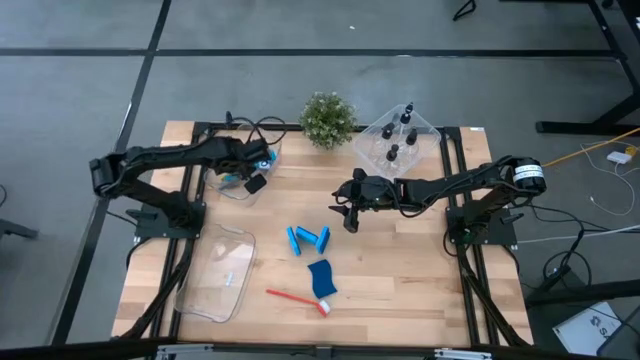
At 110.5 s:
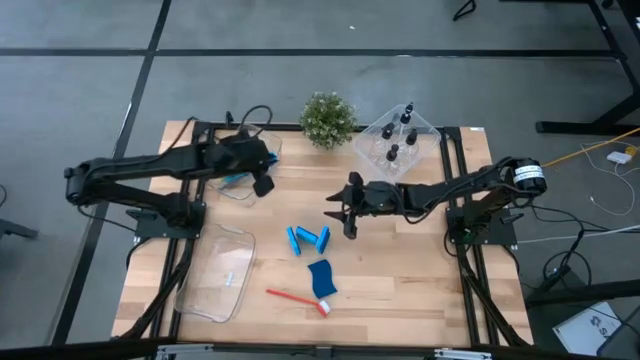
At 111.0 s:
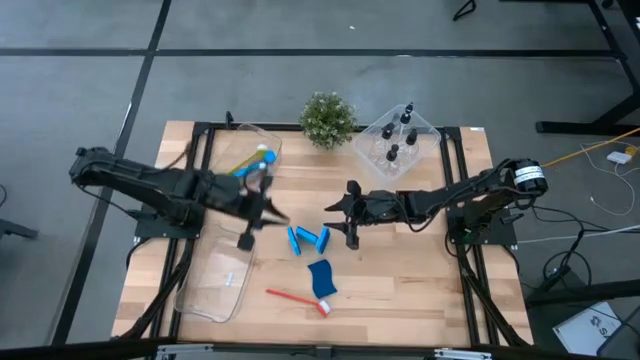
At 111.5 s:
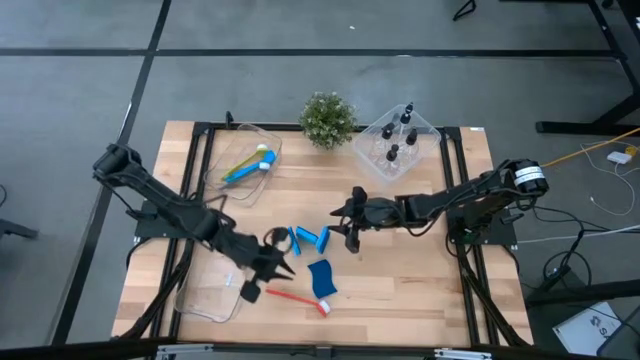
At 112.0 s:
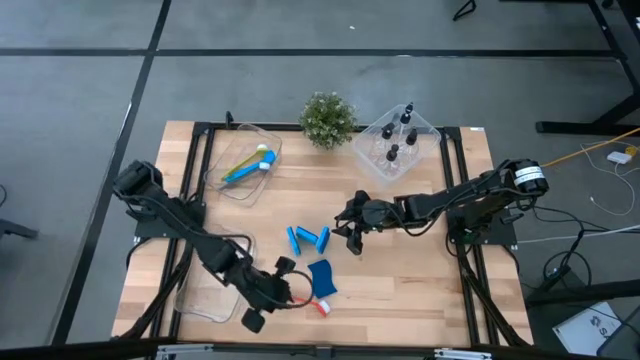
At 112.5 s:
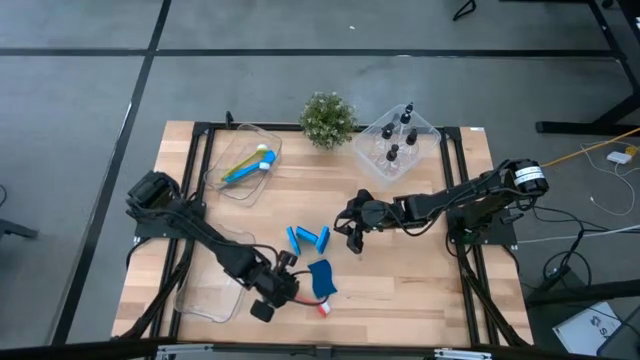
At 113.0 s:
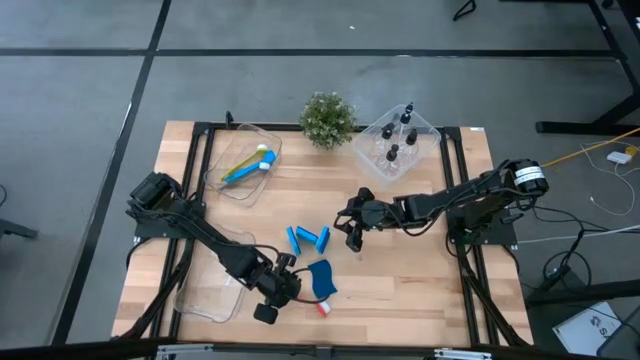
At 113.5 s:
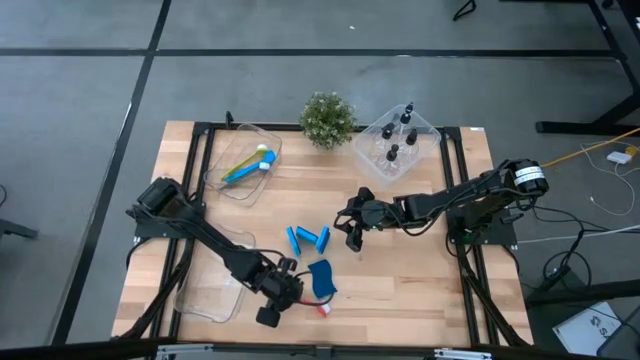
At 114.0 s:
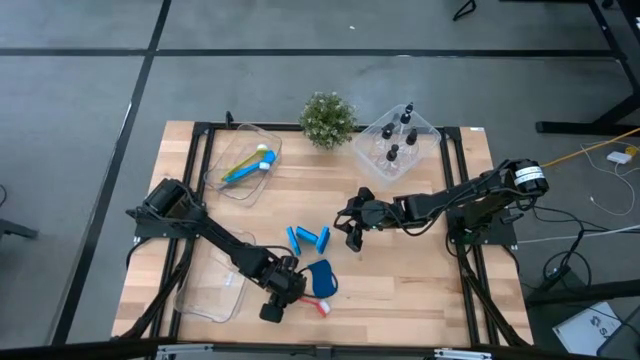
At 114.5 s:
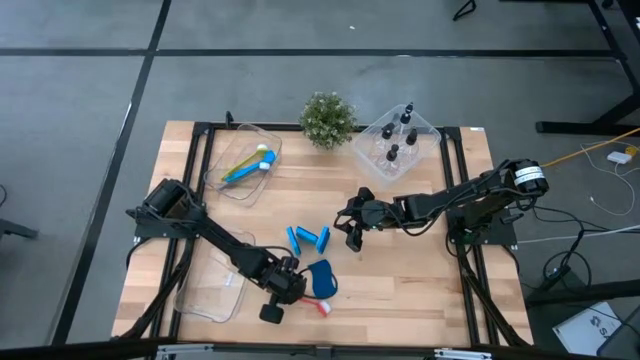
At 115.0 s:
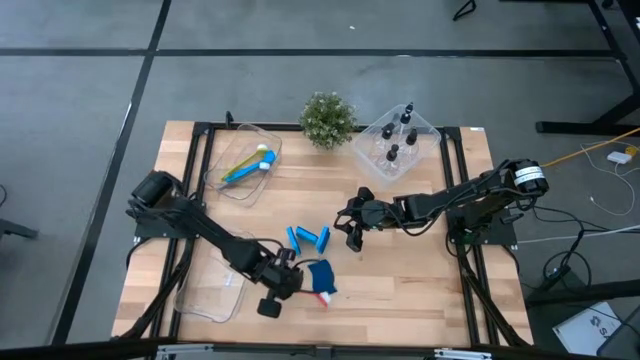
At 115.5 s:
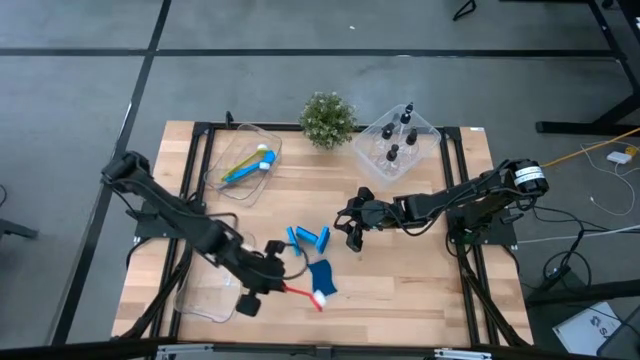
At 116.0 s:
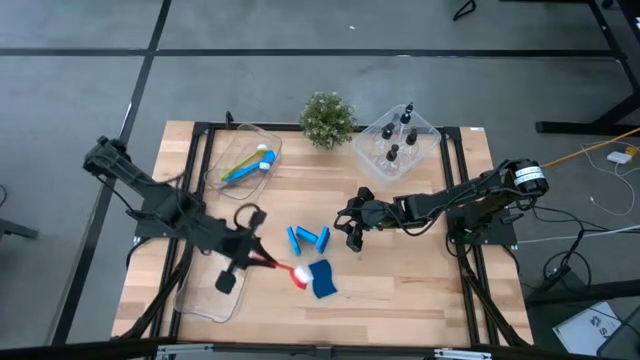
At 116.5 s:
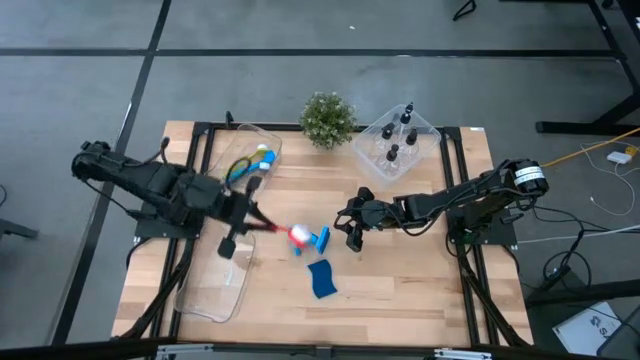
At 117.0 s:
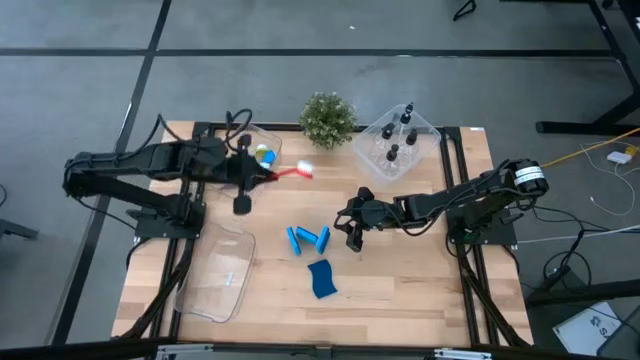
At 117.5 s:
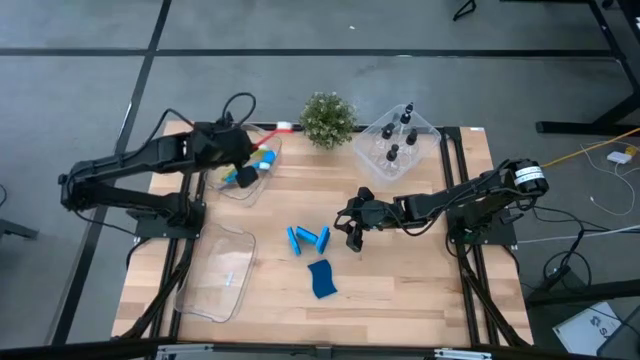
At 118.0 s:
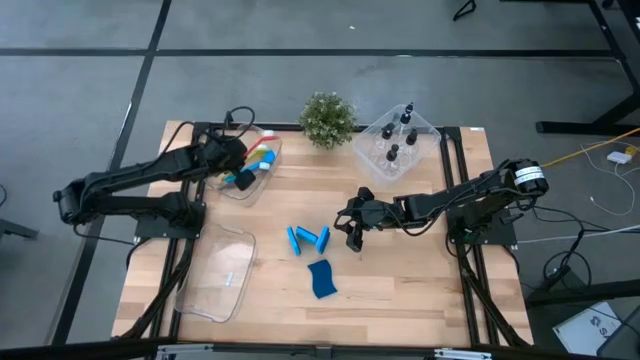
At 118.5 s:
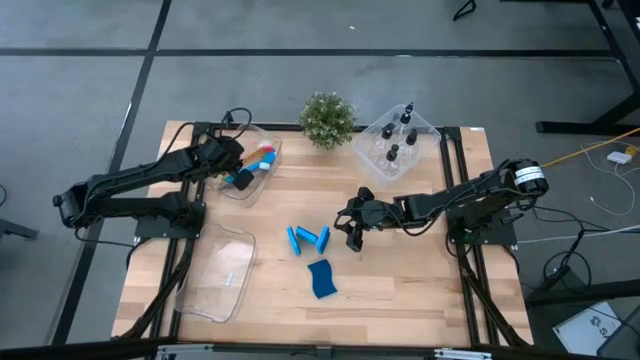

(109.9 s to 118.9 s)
Task: Pick & Place Kitchen Sink Supplies
Put the orange dish brush into the top transparent bin

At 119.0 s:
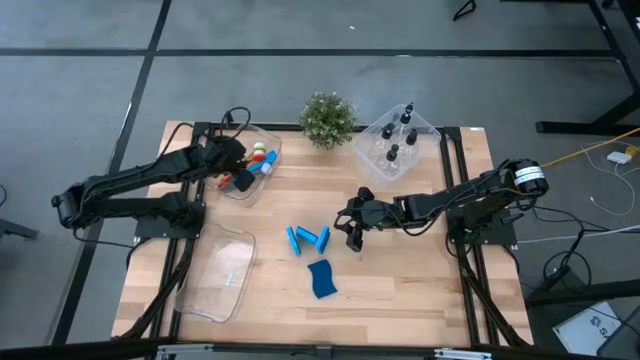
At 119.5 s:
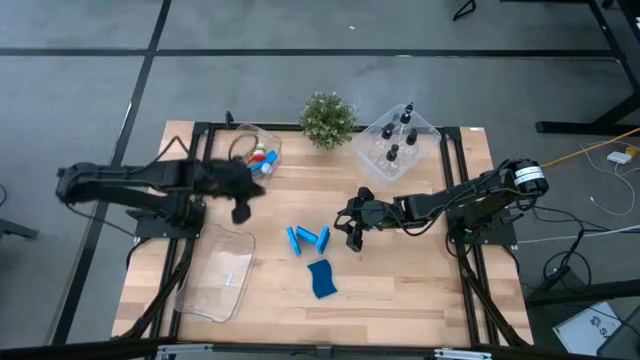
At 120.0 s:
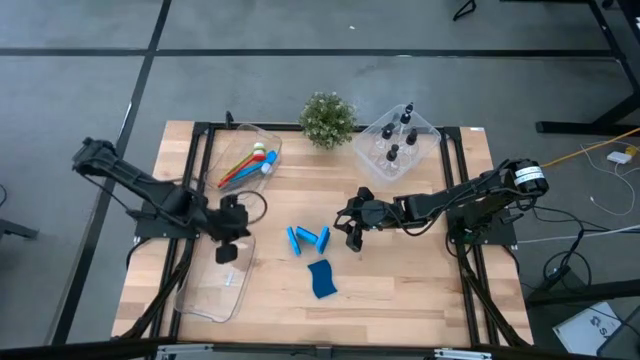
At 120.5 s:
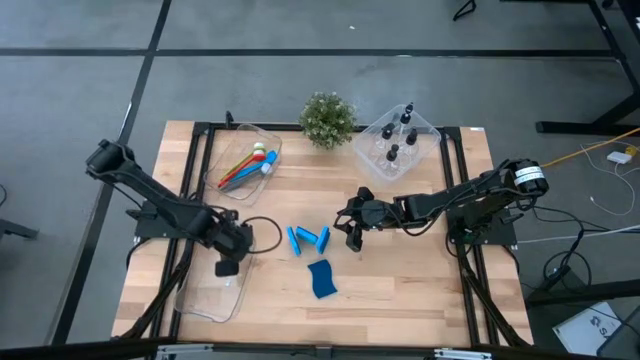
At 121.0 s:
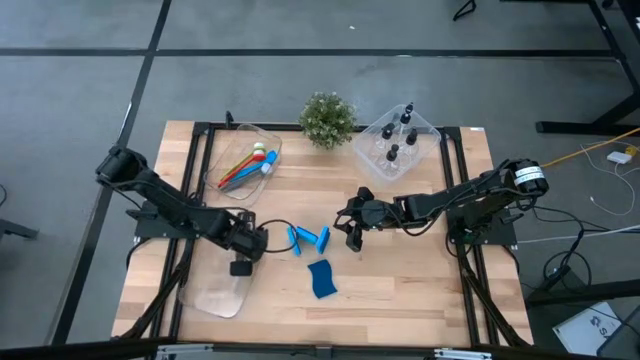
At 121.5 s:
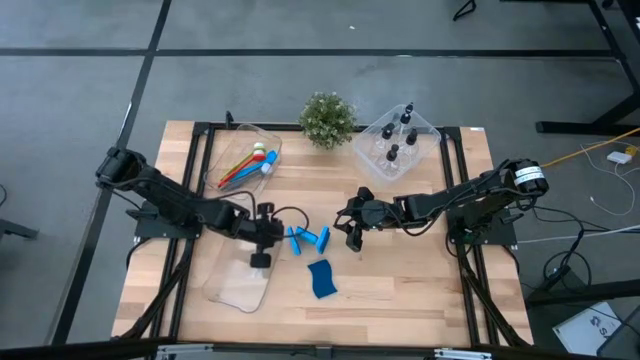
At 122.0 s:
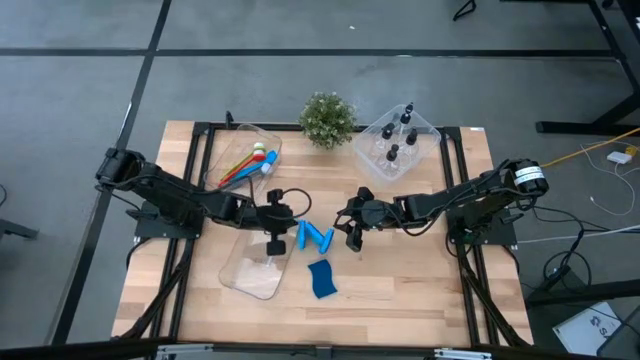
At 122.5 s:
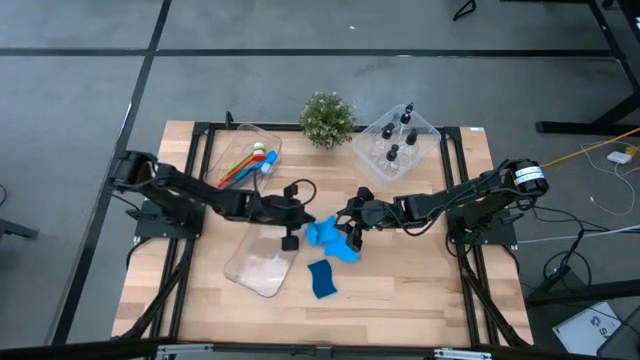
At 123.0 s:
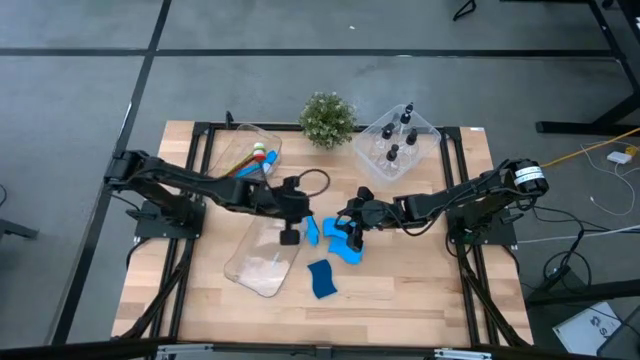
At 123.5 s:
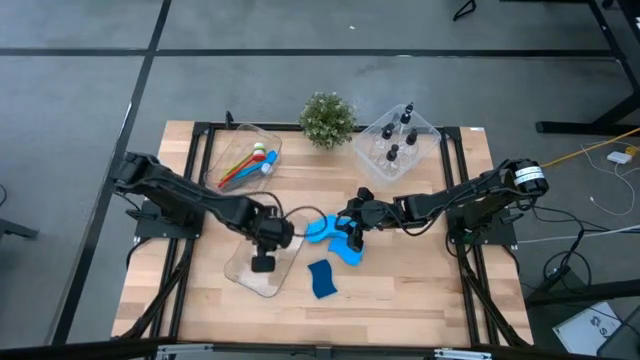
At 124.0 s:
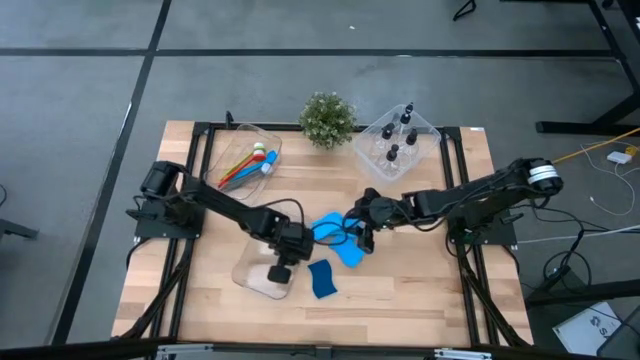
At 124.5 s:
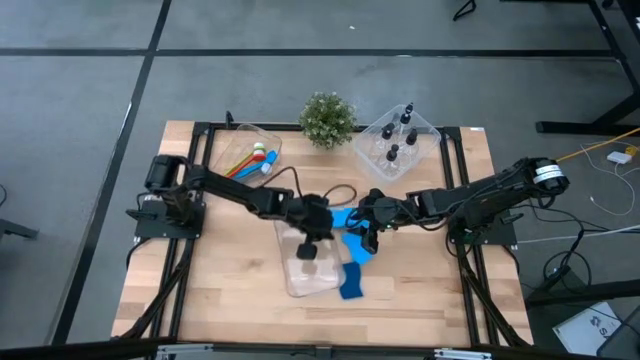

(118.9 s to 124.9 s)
Move the bottom transparent bin to the center of the table

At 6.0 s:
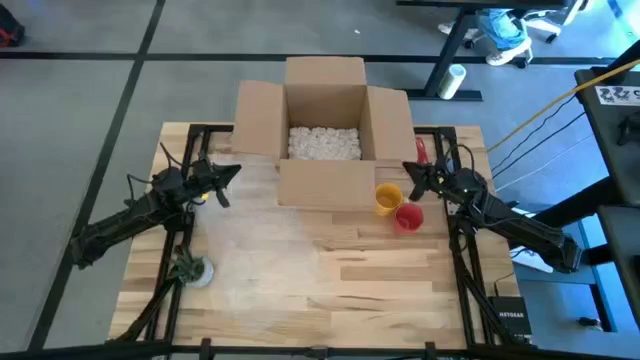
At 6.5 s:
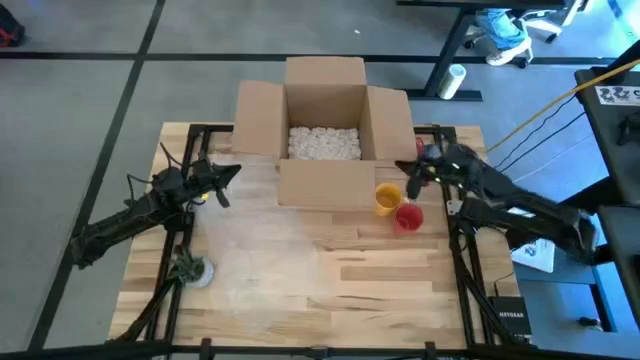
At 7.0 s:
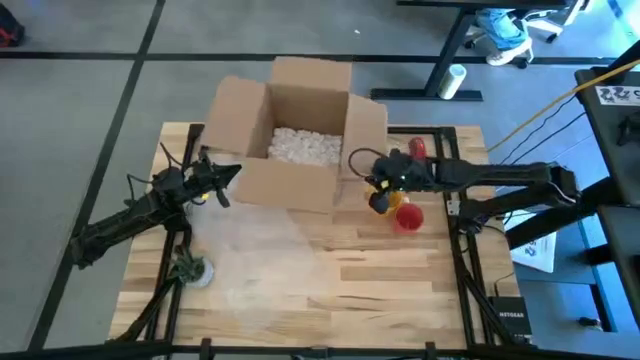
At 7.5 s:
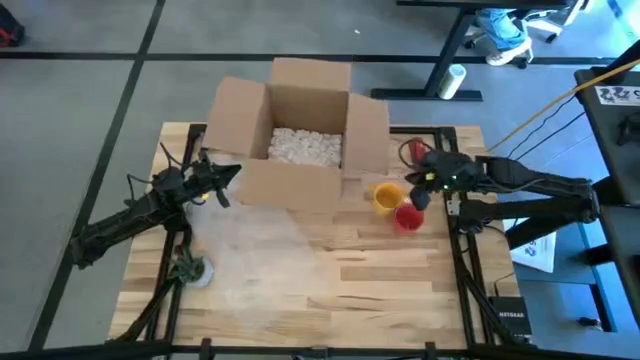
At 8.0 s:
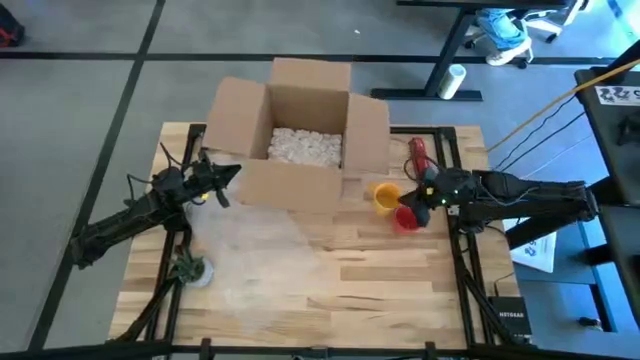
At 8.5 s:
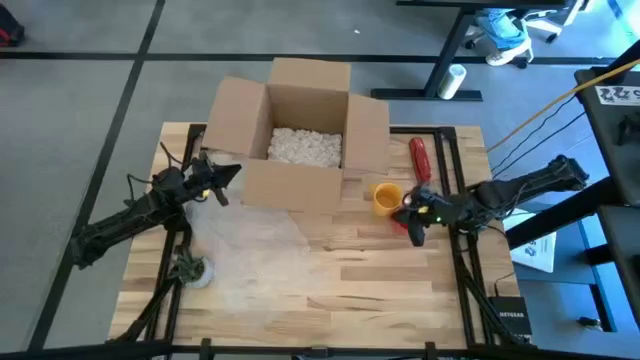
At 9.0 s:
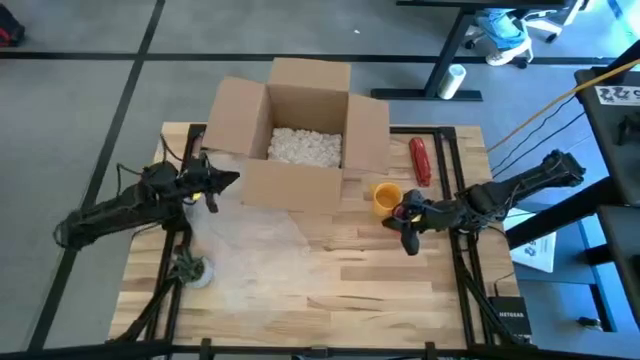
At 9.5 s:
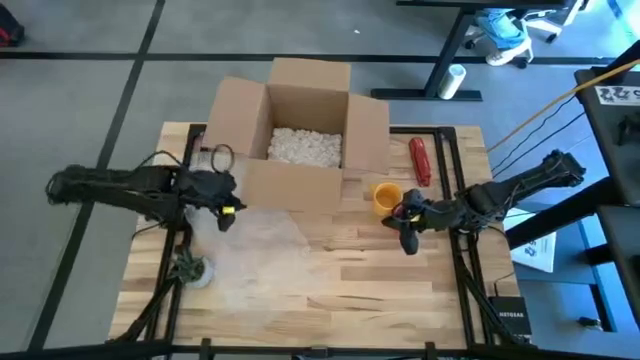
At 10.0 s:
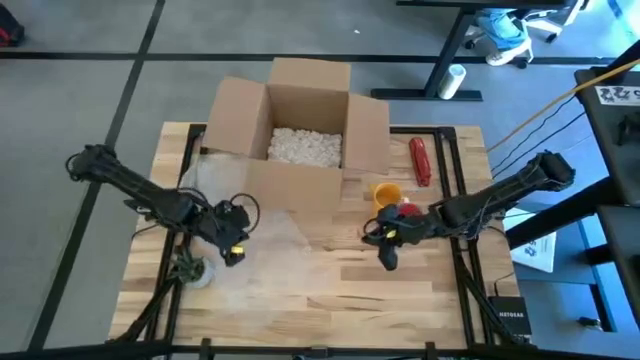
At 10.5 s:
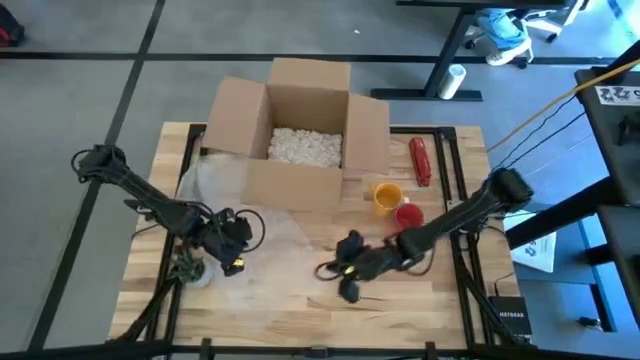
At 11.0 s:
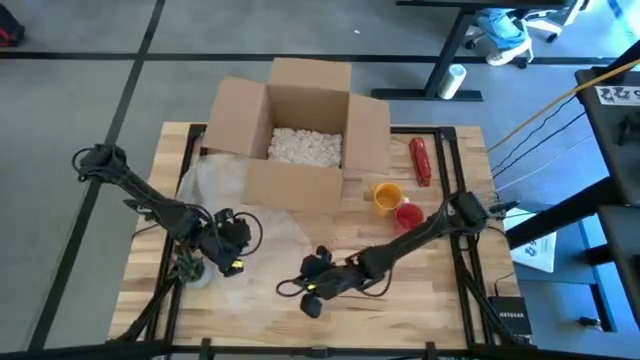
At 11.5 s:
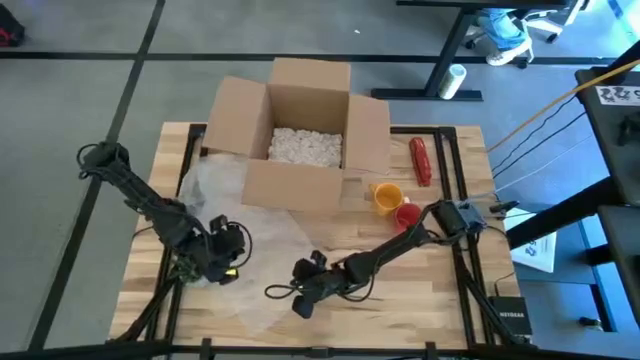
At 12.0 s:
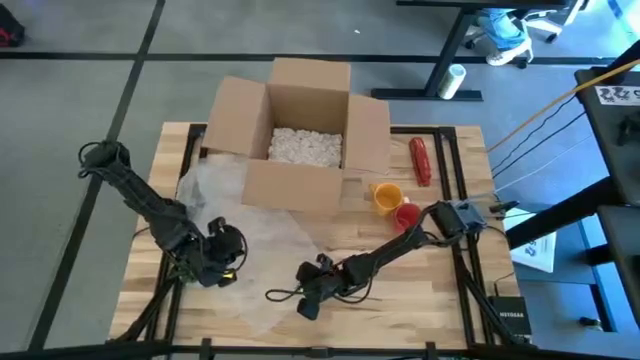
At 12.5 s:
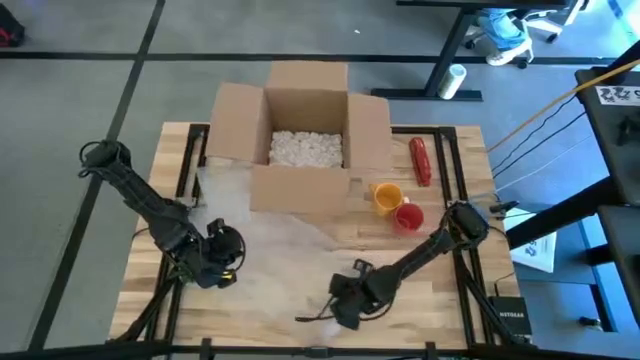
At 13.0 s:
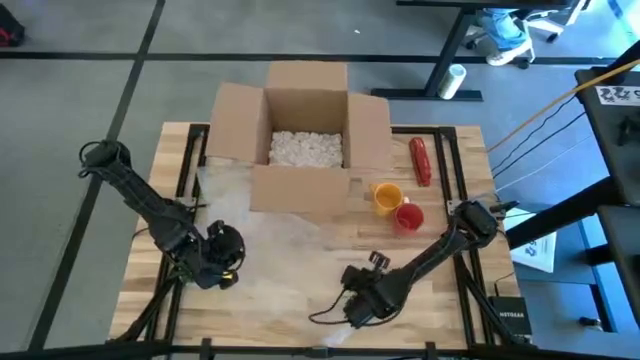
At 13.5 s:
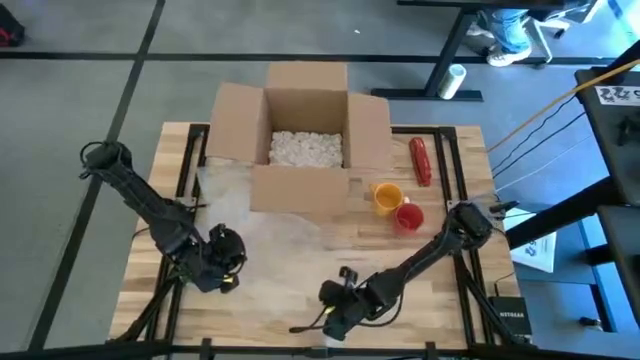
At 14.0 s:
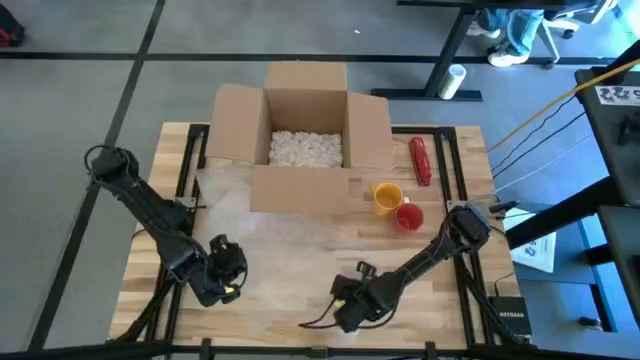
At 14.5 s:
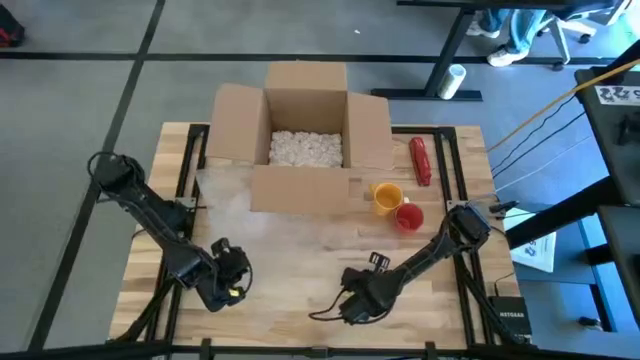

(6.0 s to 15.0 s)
Task: wrap mug
Adjust the bubble wrap
